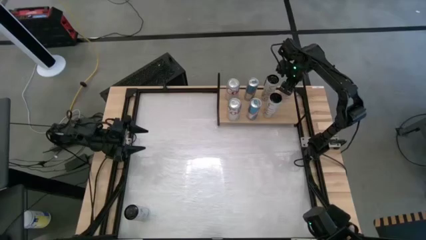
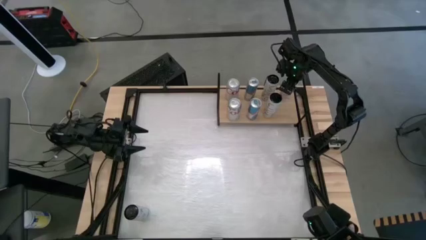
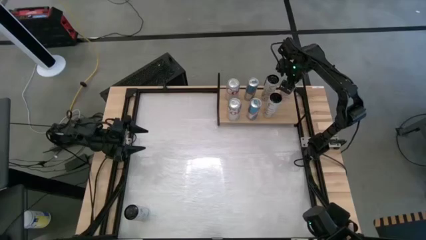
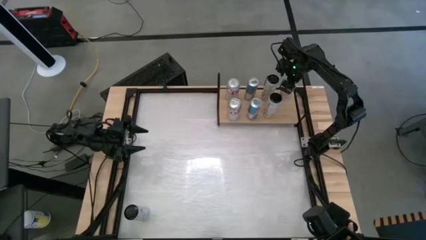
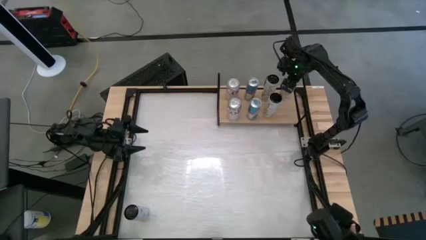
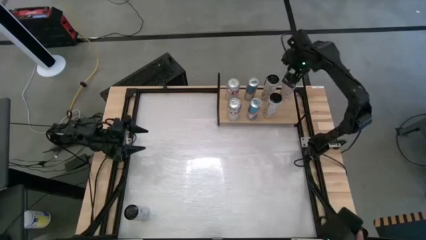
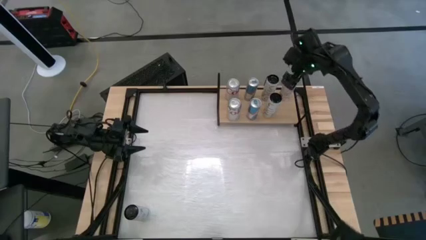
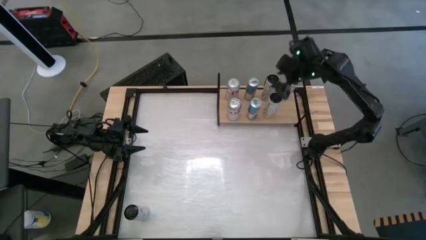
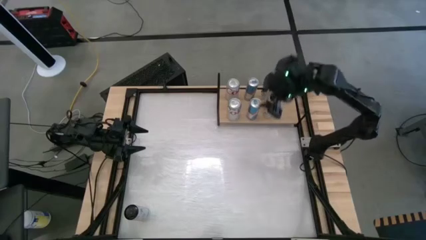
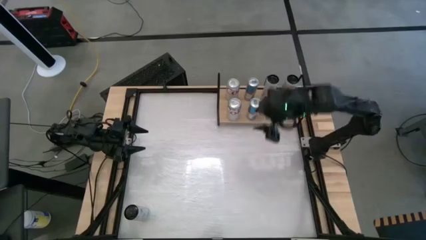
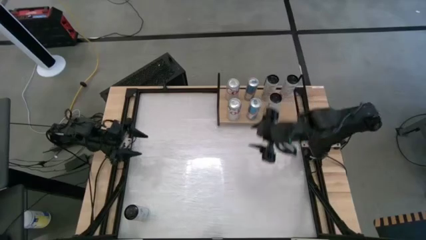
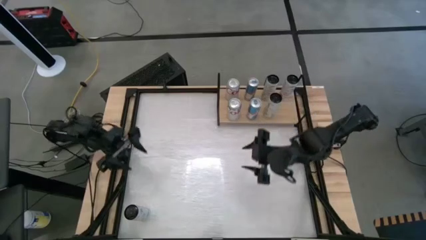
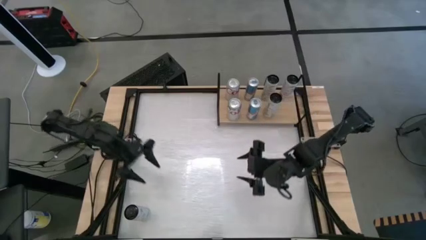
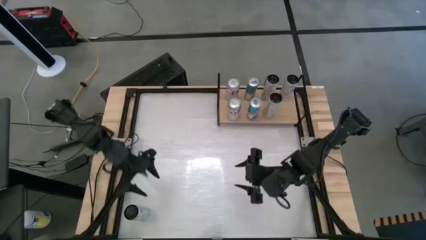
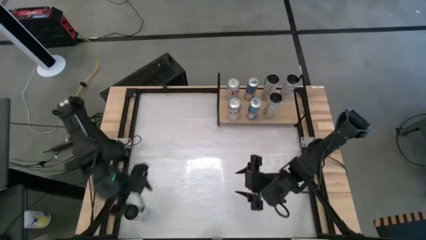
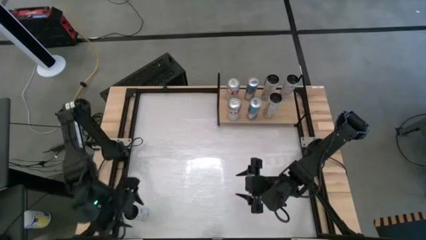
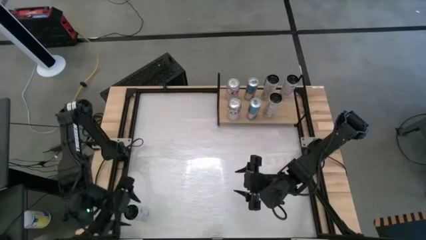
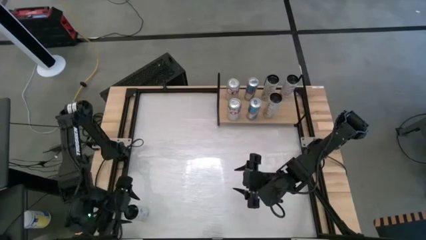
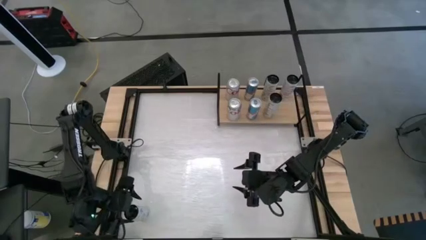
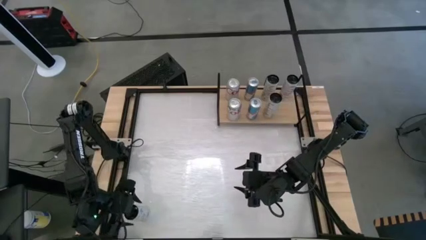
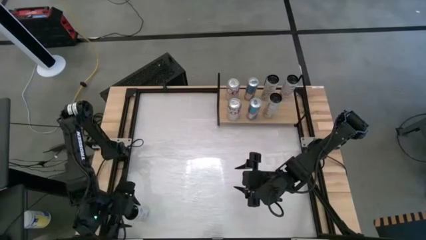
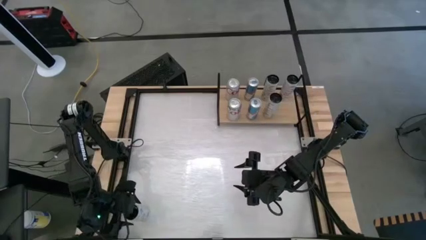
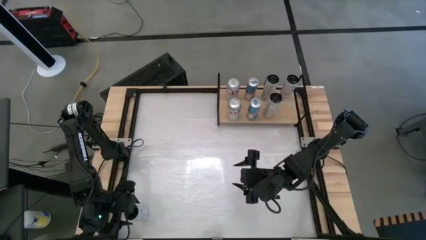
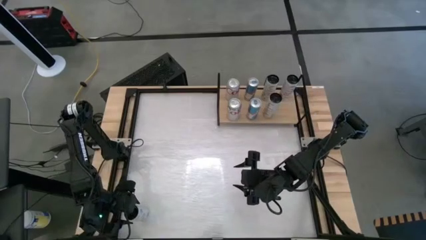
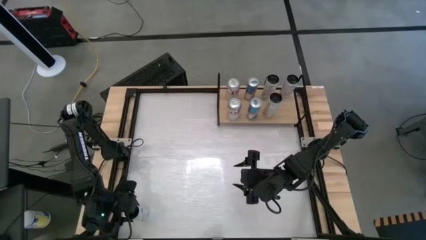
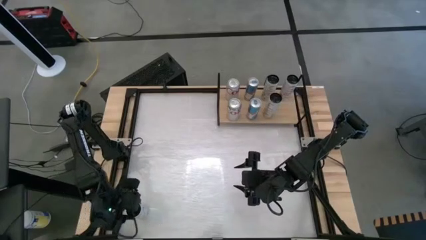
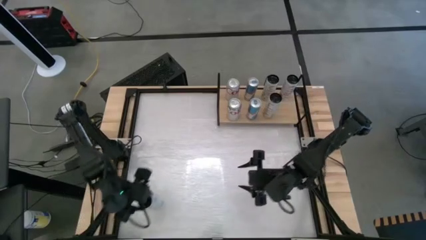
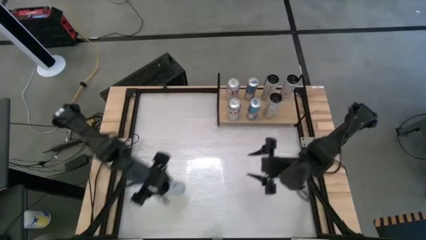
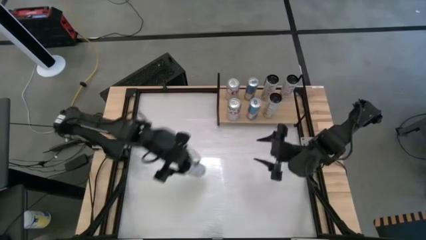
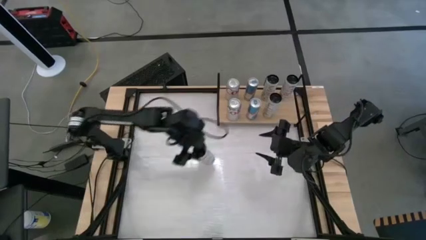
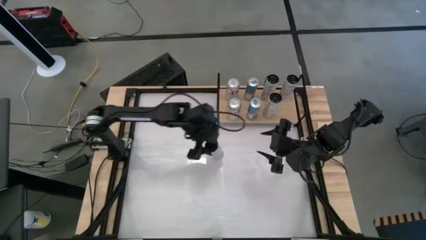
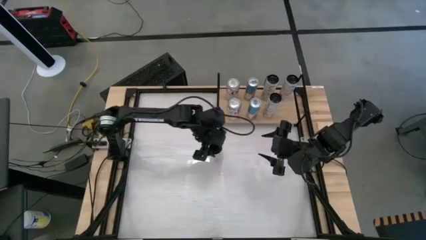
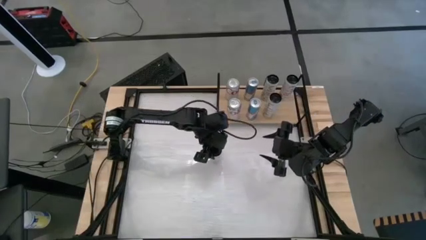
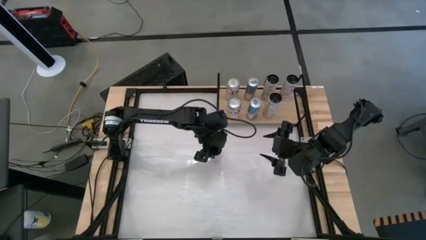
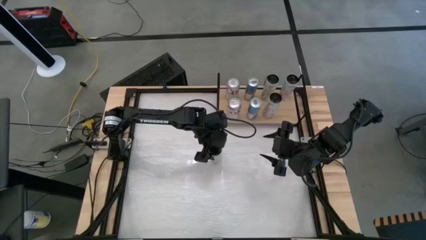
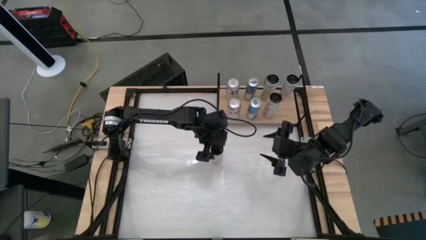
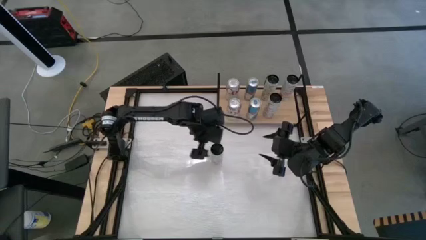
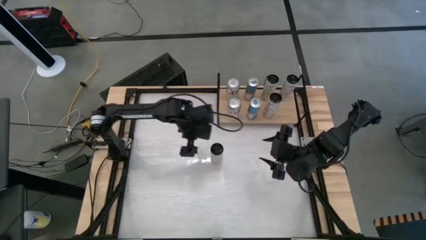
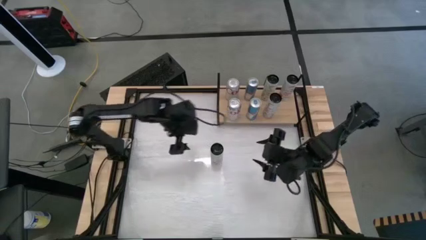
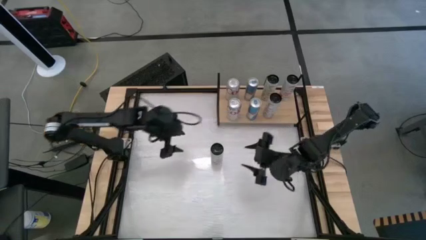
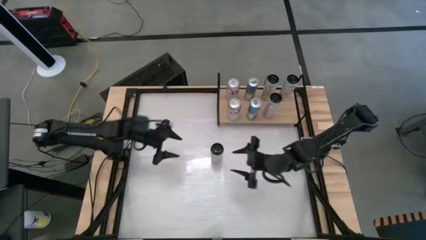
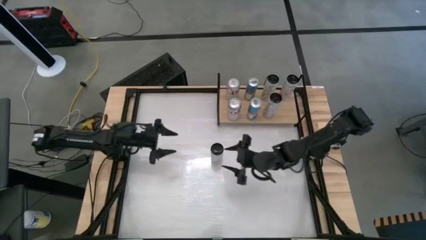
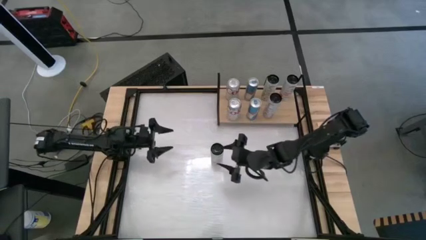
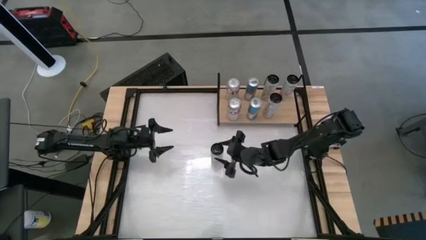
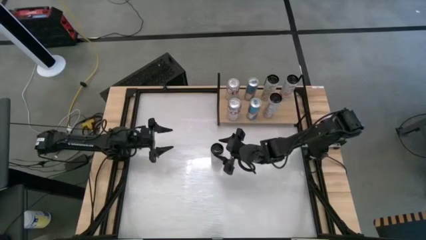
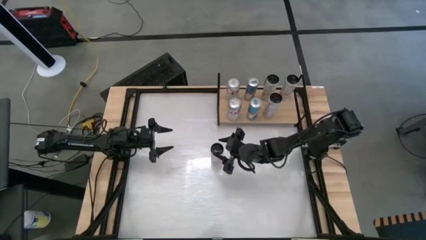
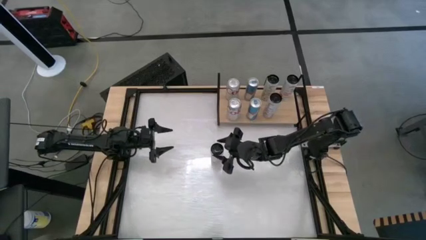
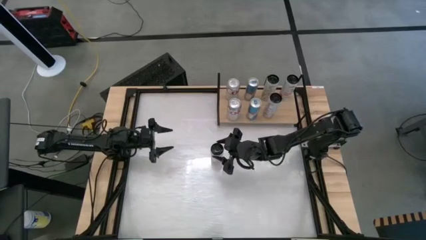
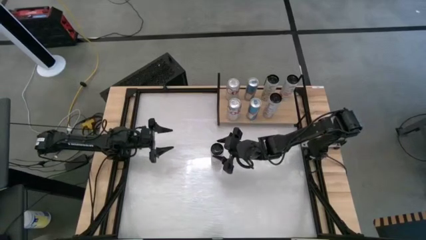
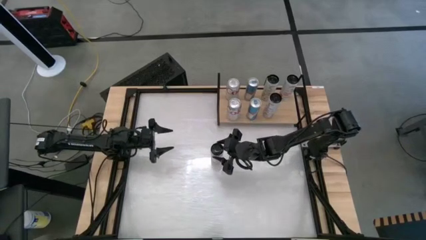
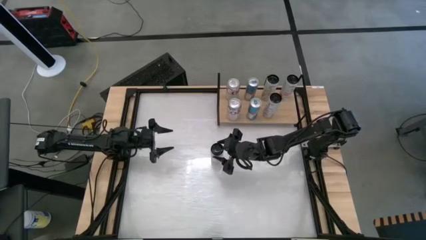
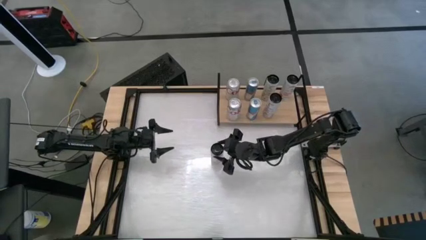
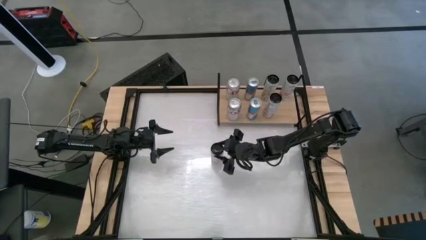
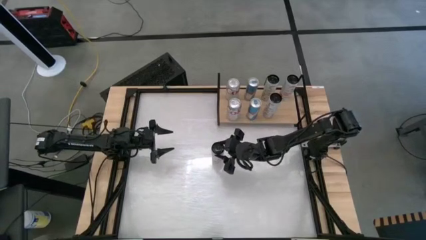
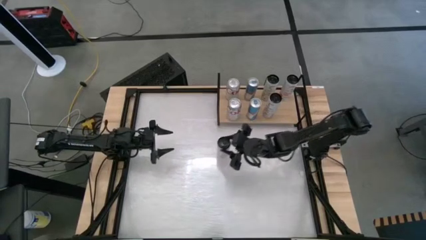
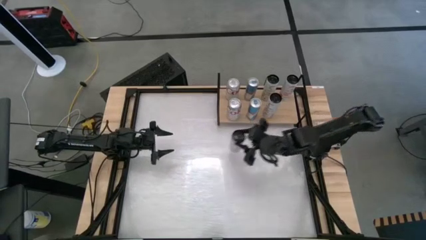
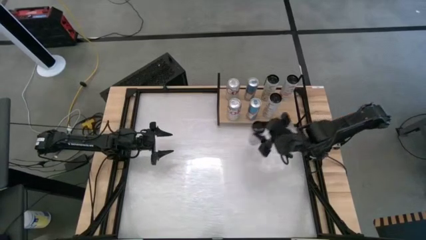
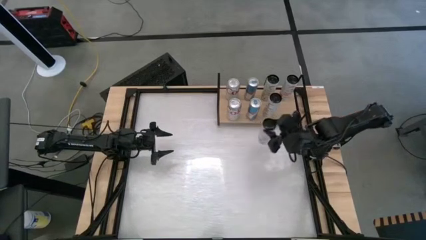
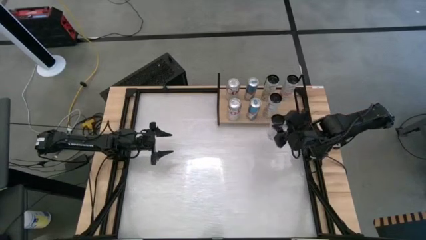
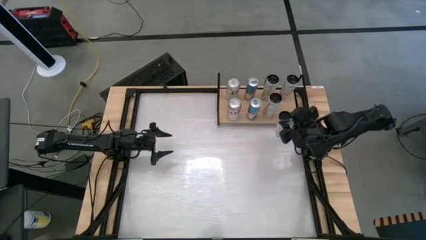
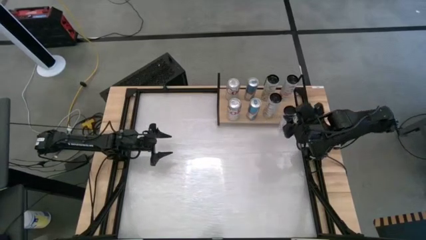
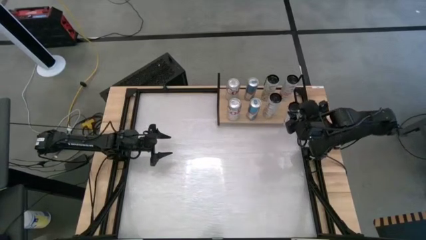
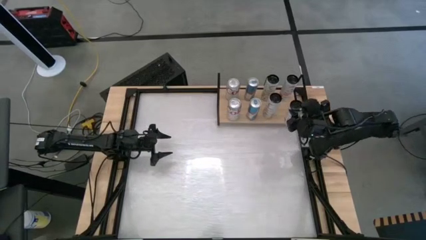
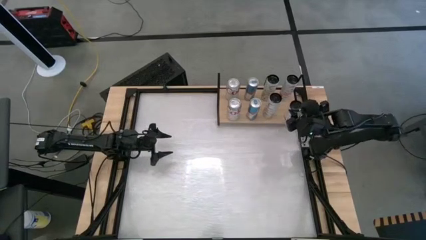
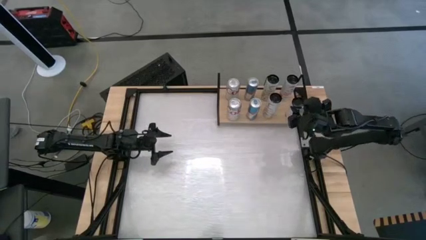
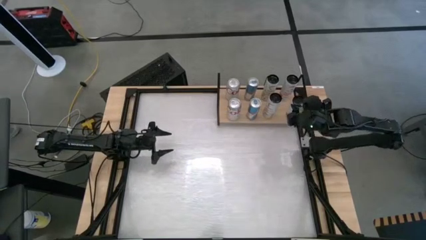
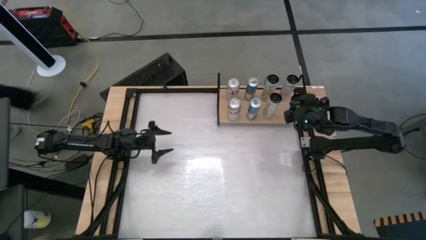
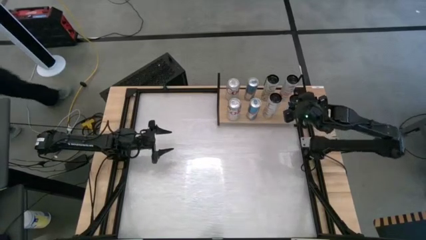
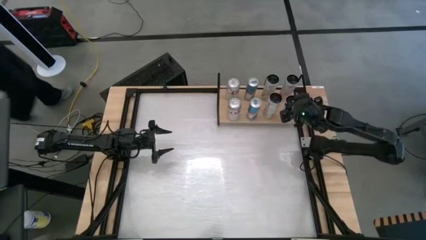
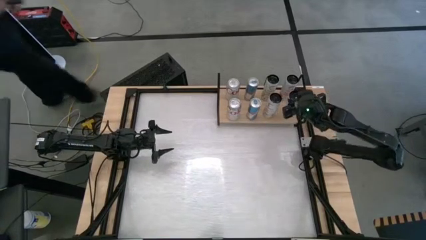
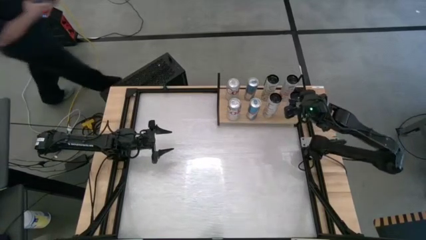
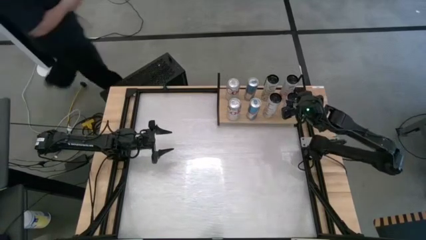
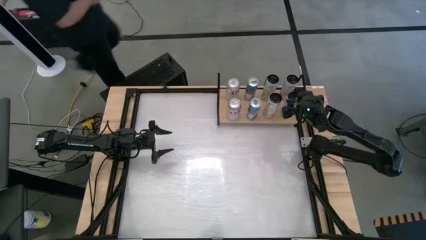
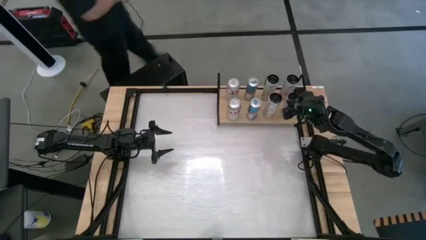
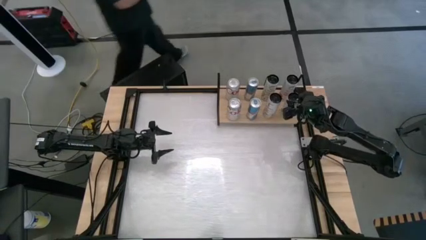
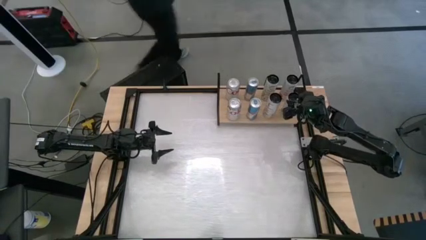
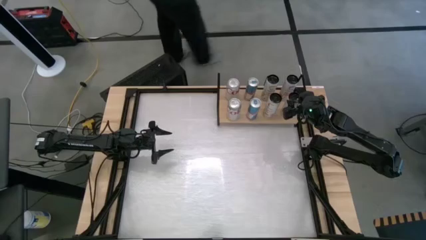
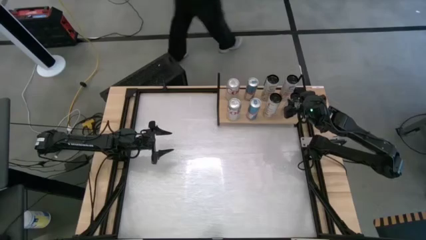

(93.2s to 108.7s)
Task: Place canned beverage on shelf
Put the black can on the shelf

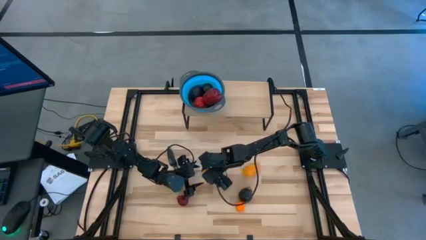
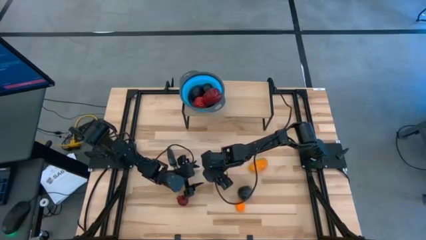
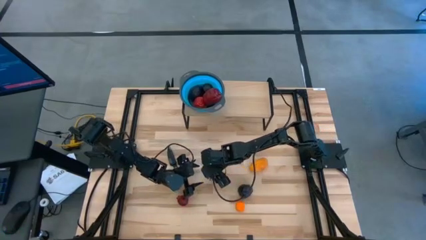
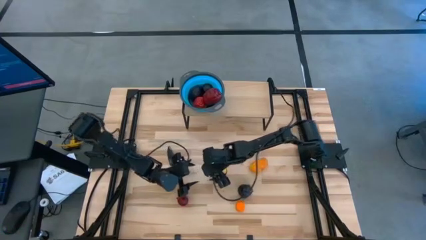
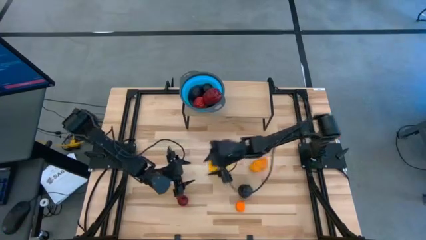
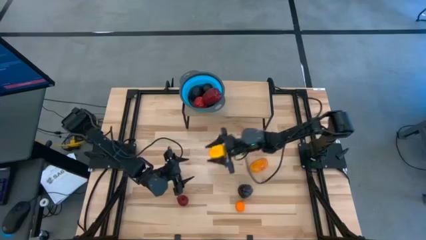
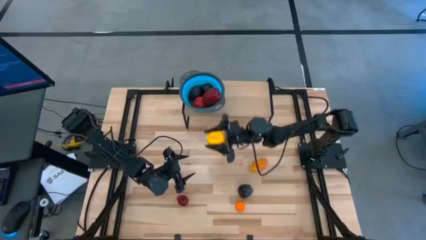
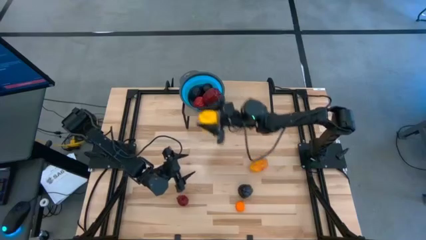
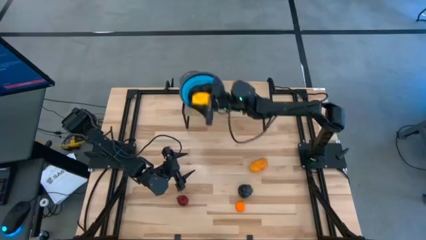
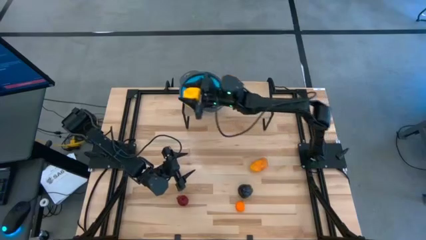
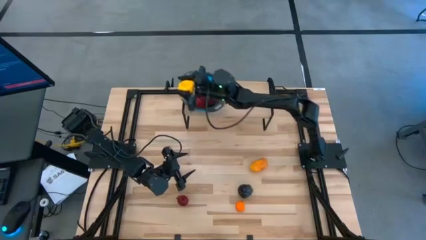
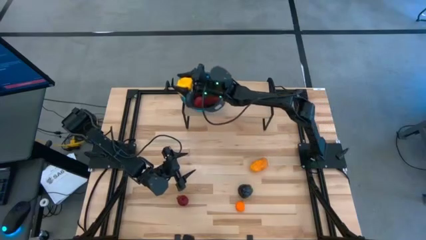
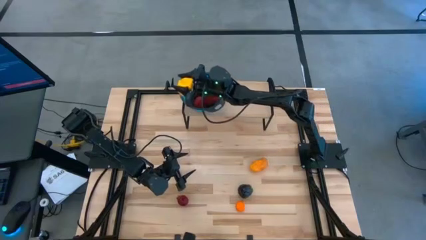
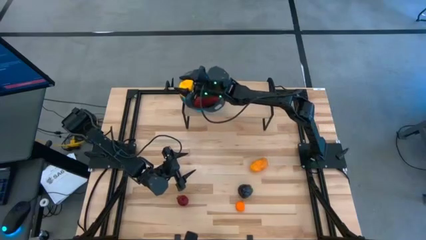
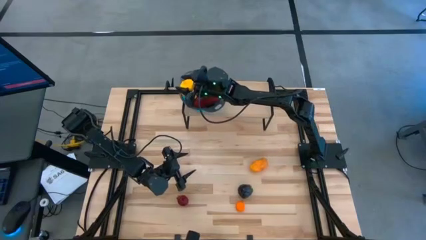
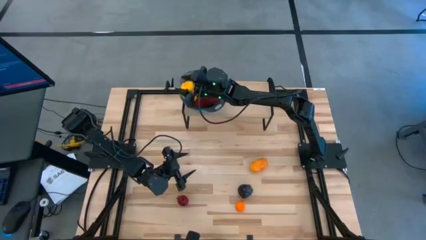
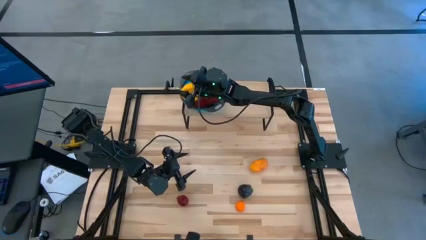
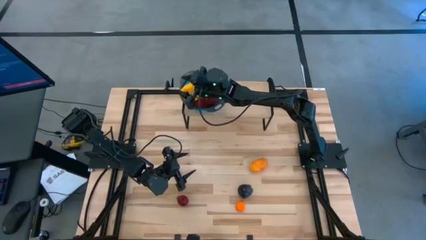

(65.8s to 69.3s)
Task: Pick & Place Fruit
Put the yellow pepper into the blue strainer bowl on the shelf
